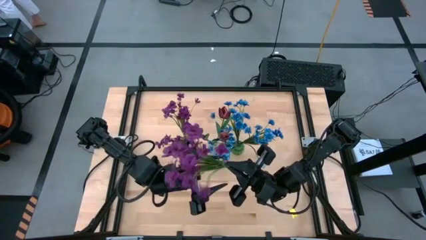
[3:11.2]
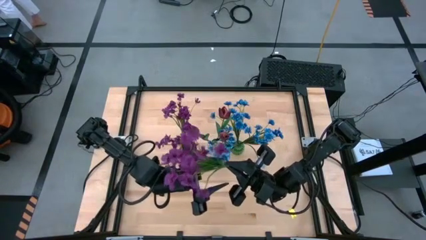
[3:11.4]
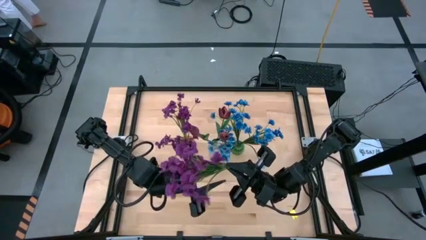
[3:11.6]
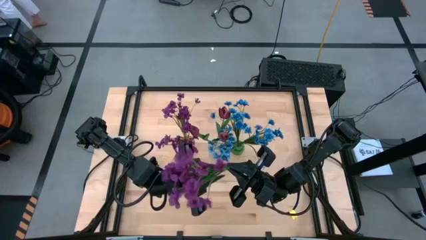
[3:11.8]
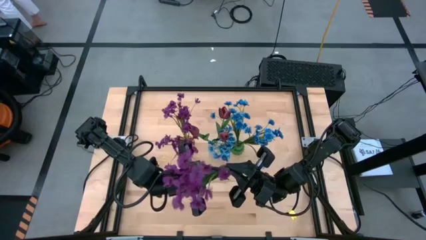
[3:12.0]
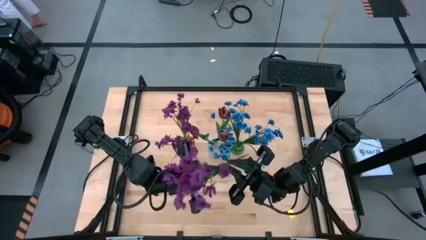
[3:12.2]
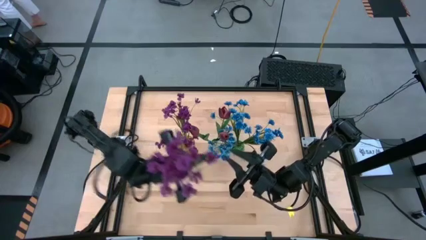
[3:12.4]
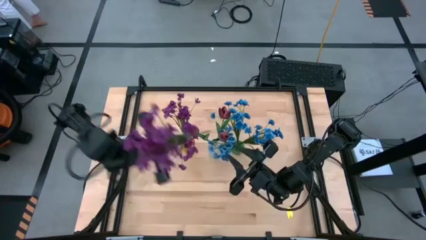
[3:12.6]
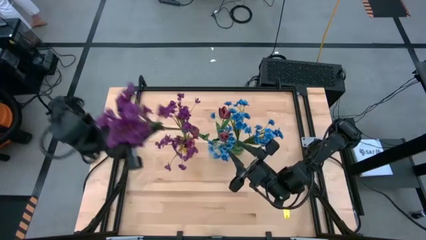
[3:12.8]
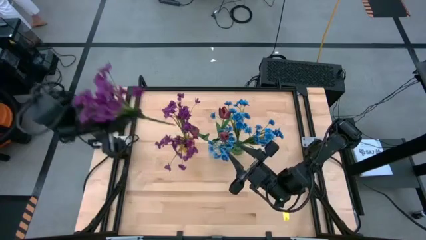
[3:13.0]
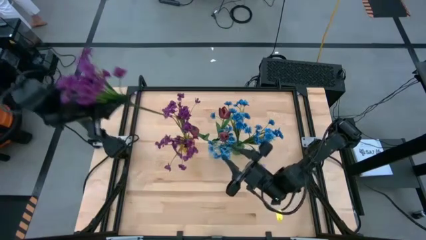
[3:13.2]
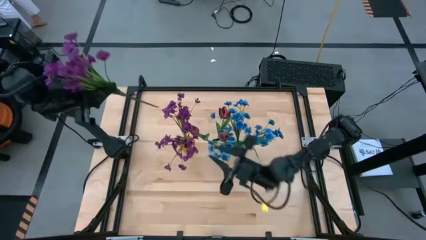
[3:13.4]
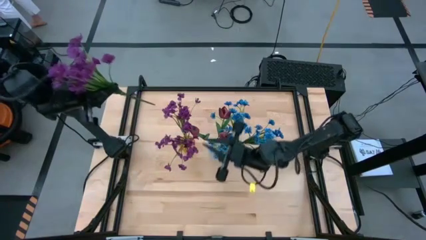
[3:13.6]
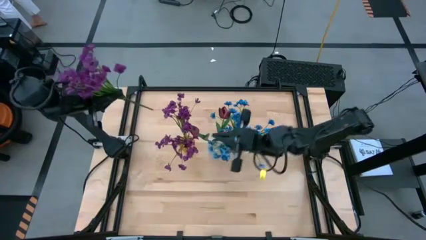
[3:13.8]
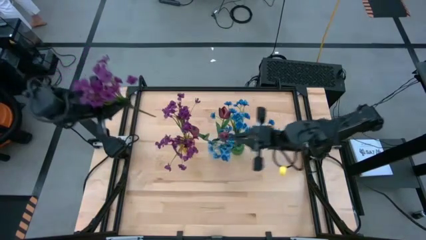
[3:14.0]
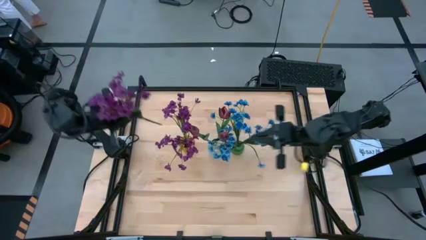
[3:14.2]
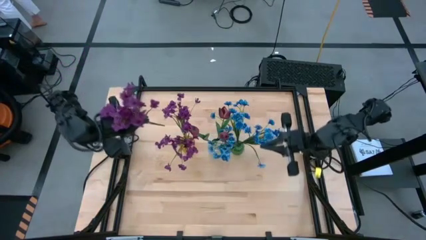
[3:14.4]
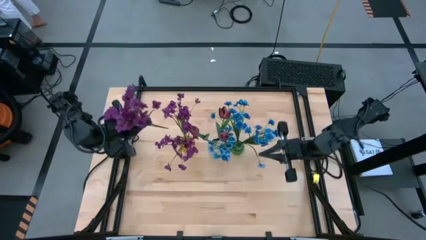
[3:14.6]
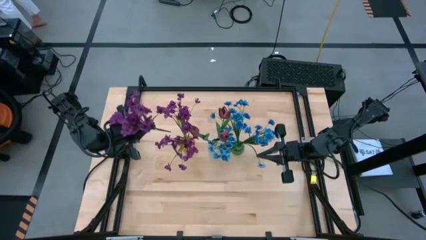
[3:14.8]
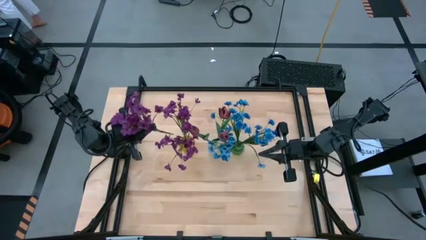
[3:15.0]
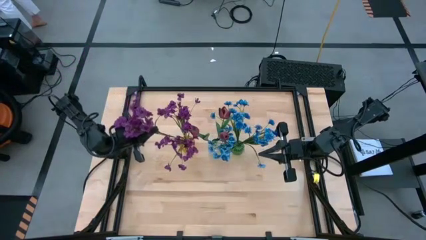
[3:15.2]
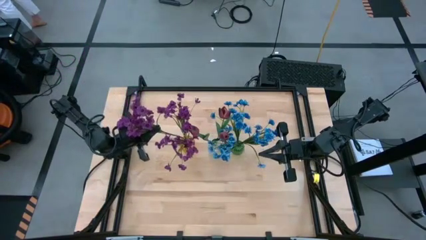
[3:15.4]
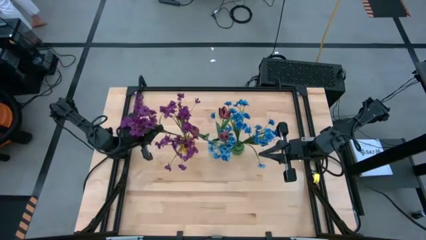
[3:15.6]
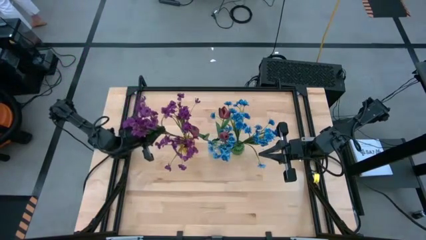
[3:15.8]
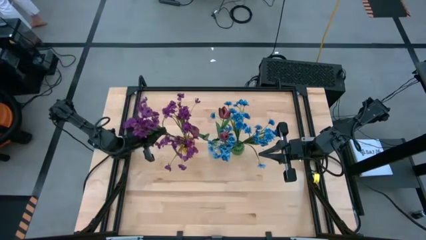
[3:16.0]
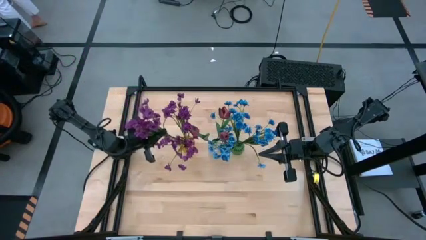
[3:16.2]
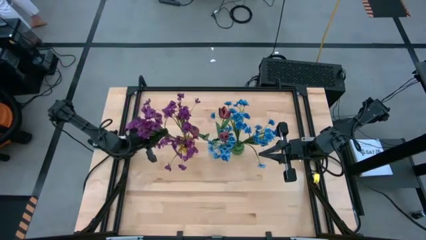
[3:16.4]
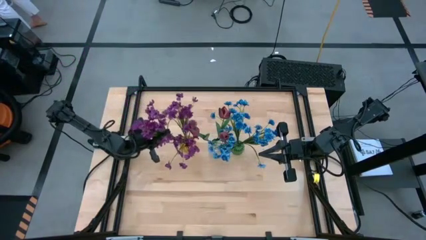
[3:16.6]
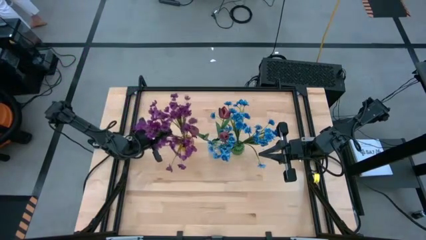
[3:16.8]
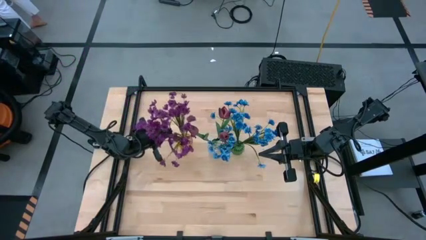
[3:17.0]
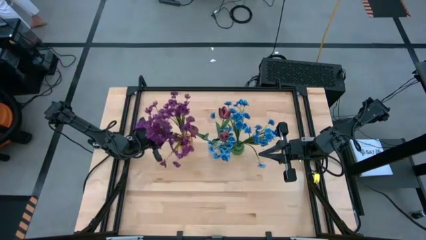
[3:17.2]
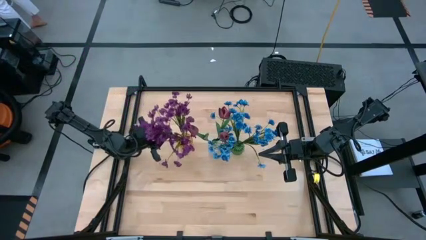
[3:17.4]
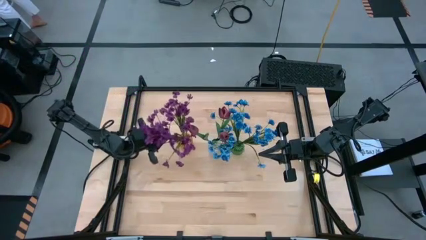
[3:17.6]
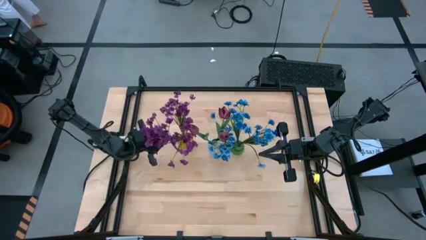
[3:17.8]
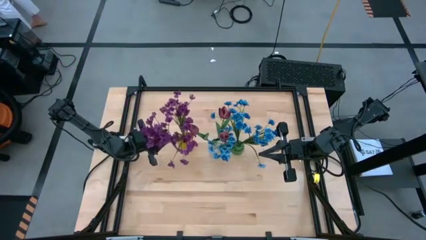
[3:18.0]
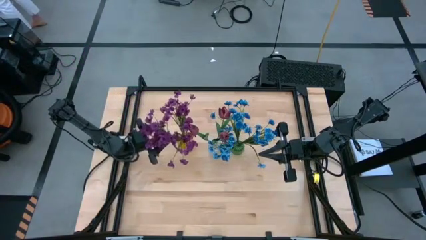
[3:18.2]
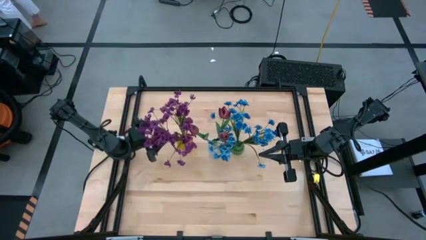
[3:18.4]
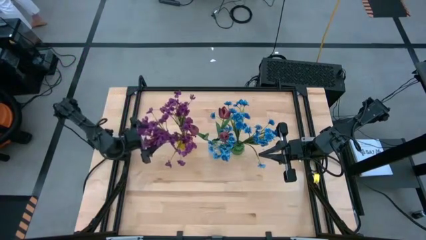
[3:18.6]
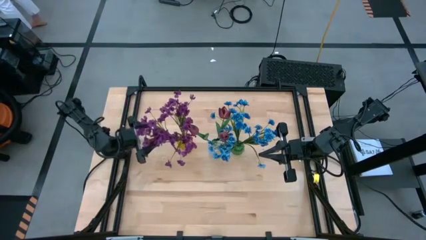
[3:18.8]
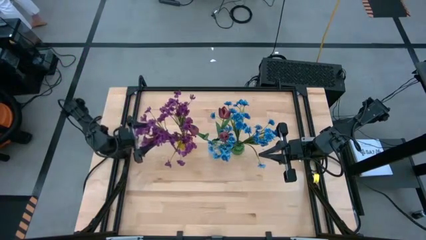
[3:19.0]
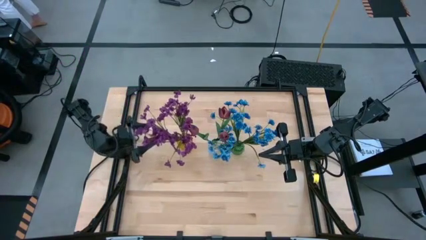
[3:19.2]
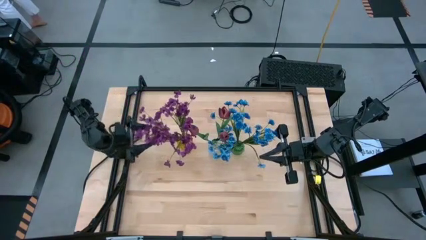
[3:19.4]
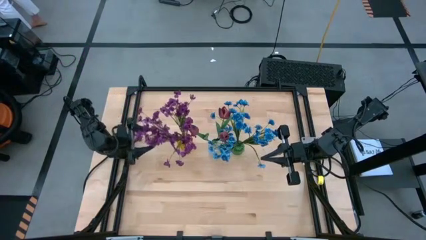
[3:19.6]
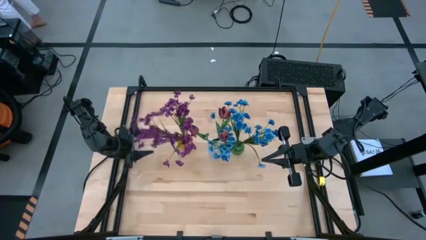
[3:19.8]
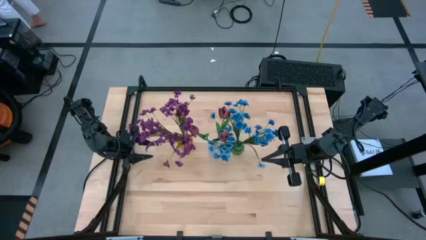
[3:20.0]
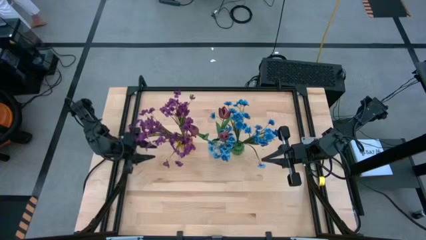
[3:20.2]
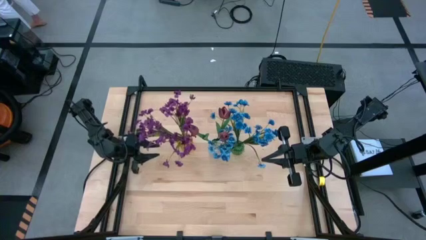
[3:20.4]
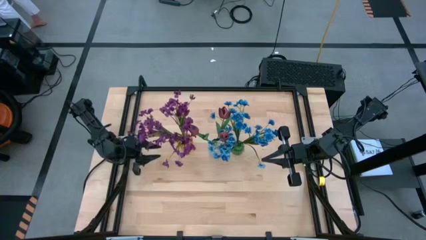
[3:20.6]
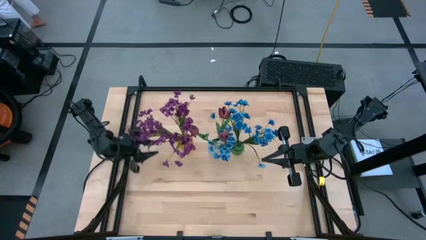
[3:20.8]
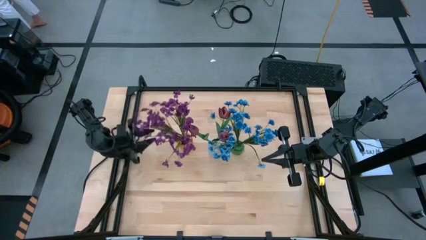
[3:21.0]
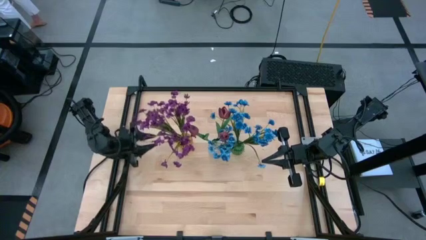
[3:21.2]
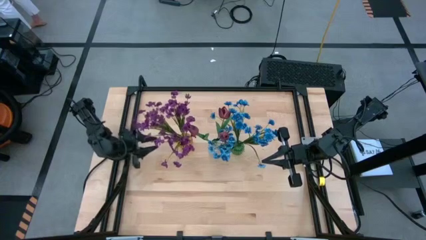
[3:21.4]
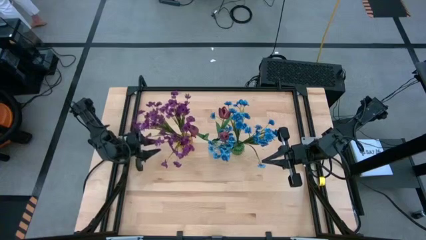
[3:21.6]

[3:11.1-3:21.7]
Task: Sort flowers into vase by color
Put the purple flowers into the yellow vase

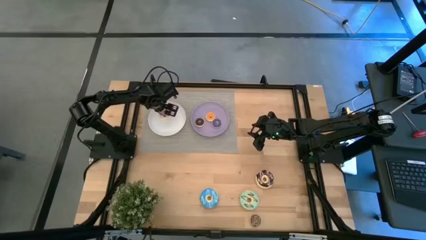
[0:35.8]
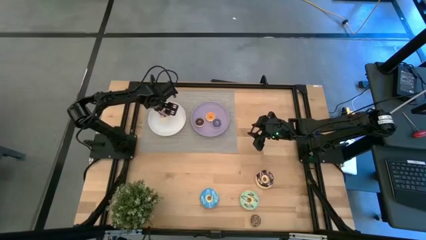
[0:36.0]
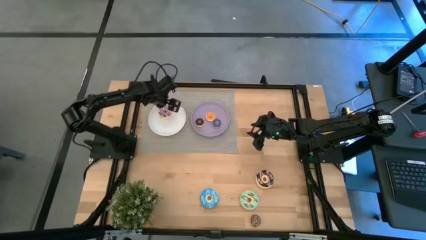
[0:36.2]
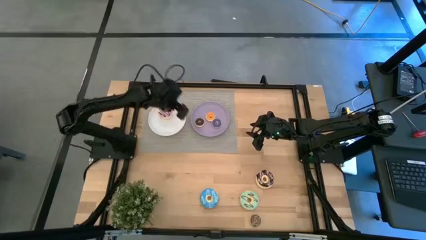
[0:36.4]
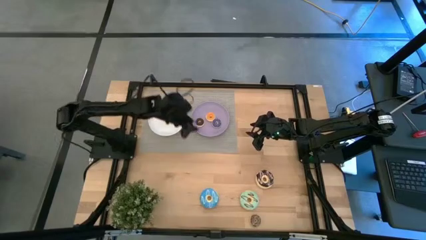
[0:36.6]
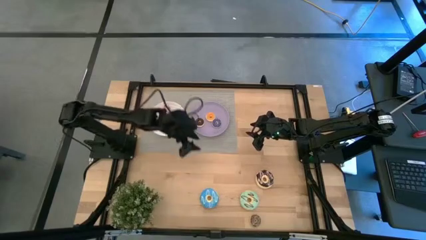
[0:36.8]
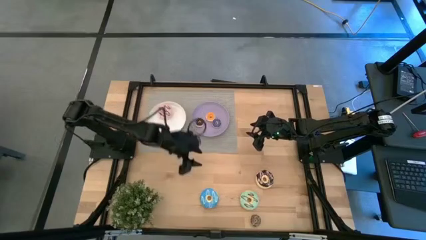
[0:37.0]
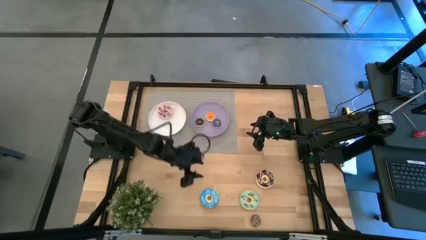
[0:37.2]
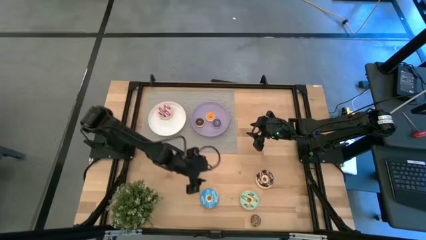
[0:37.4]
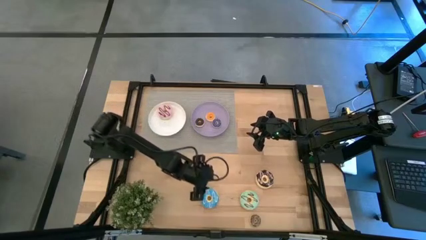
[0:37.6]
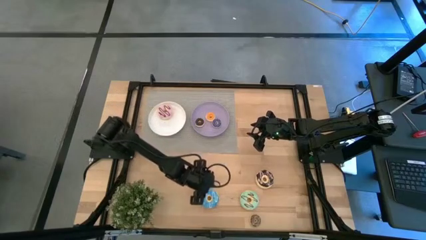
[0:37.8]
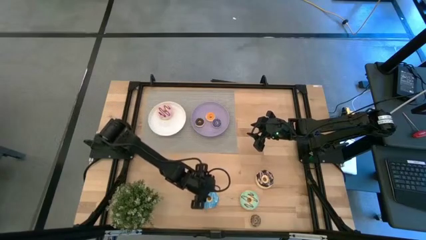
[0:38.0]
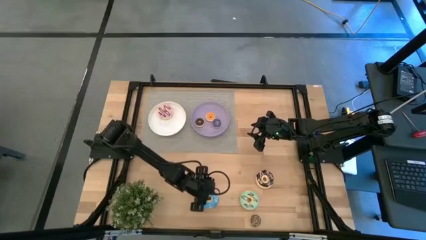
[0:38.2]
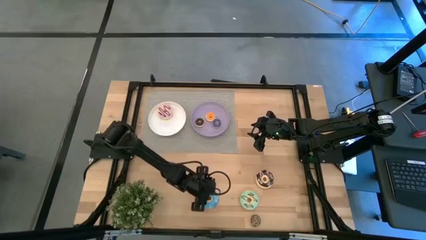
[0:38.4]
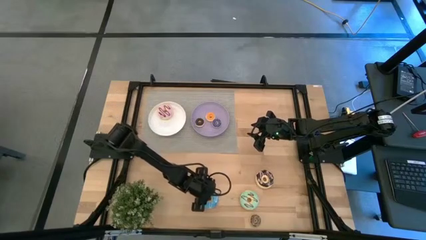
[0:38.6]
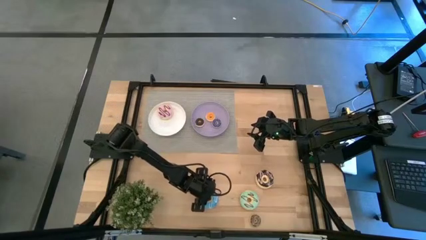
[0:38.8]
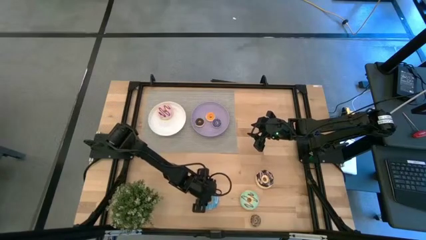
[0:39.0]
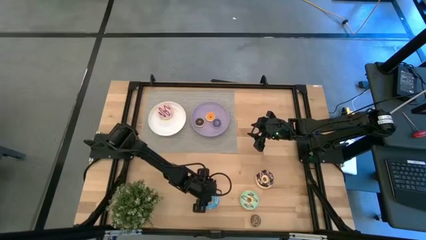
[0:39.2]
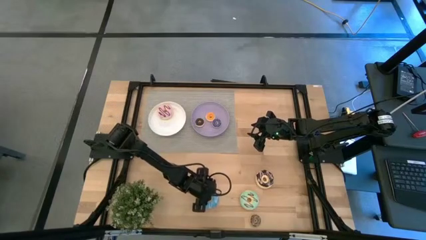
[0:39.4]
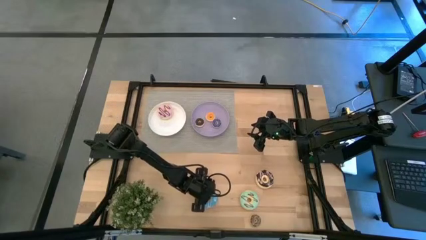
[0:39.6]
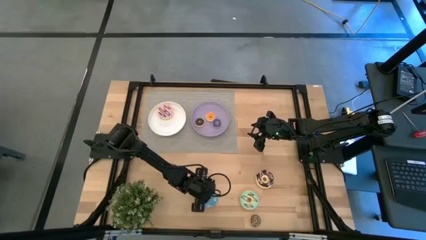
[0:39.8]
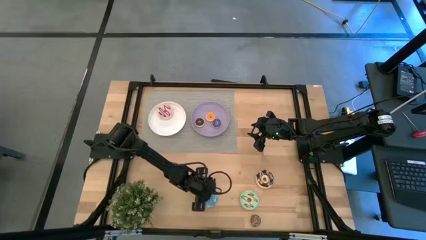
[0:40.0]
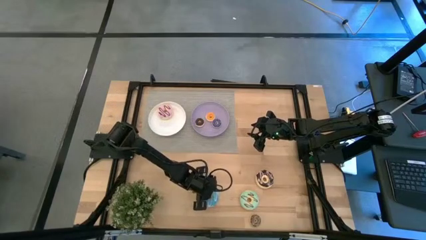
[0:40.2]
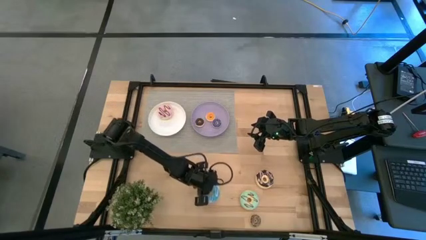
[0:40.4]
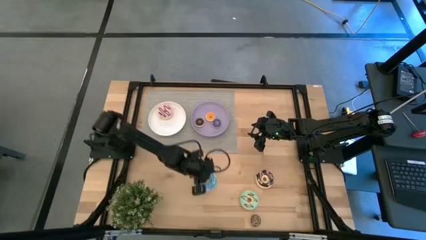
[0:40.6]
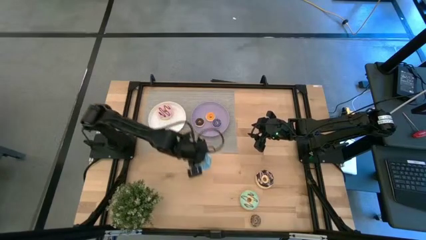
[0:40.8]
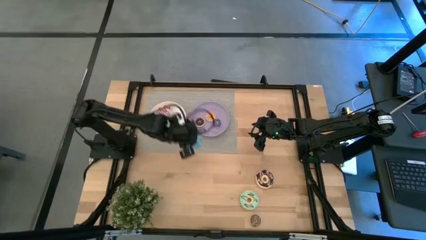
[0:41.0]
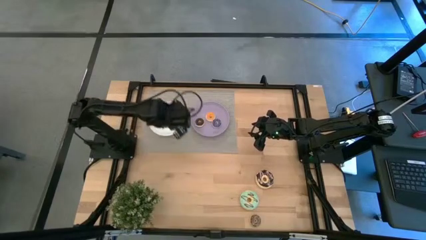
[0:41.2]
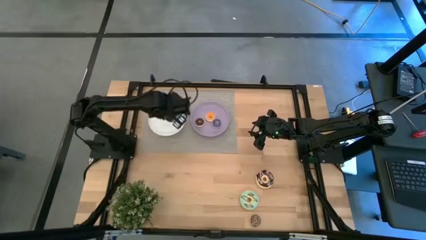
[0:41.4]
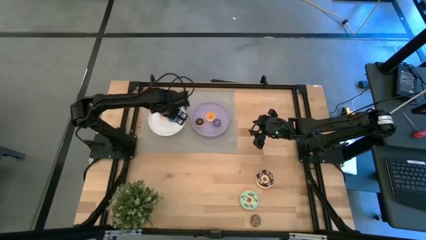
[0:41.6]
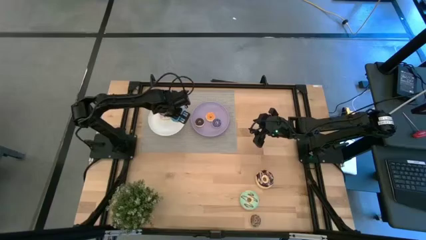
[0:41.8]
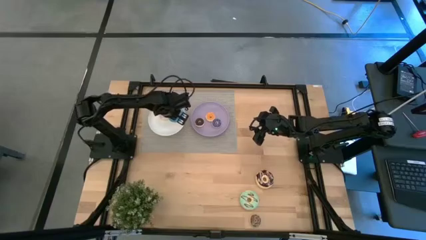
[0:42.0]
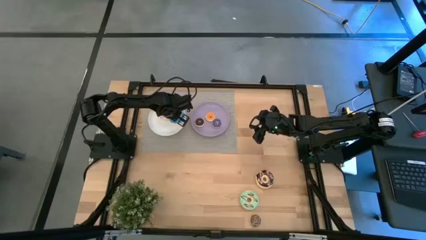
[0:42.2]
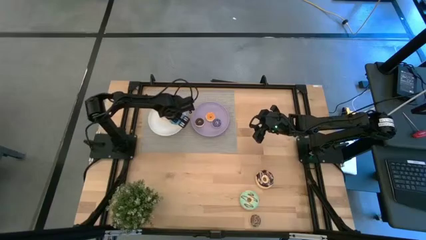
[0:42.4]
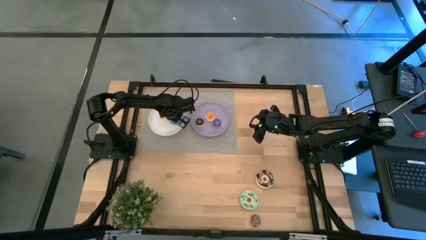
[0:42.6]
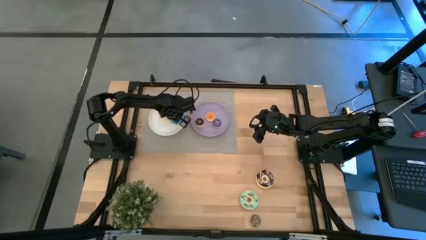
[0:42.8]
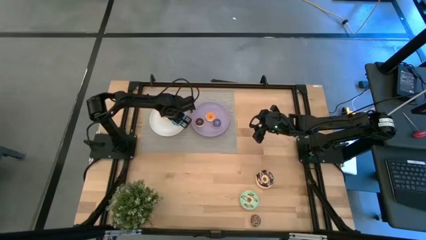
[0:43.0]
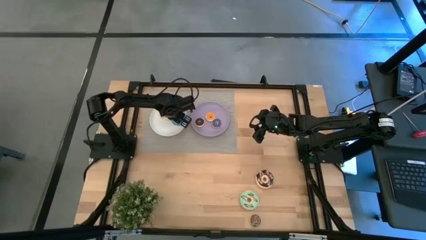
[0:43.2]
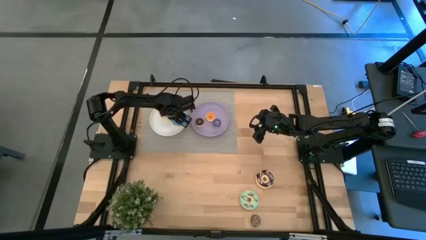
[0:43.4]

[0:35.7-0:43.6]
Task: Pick & Place donuts
Put the large blue donut on the white plate
